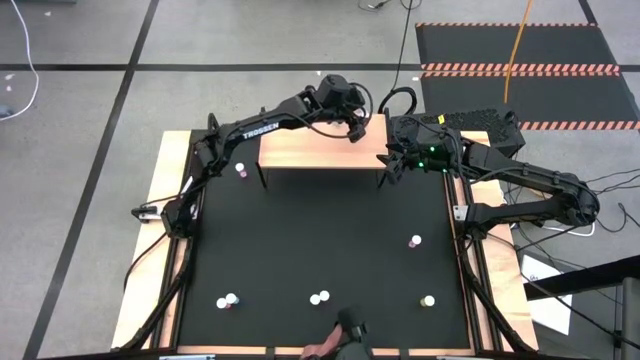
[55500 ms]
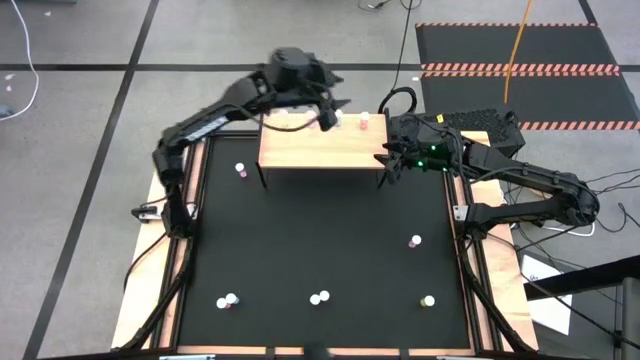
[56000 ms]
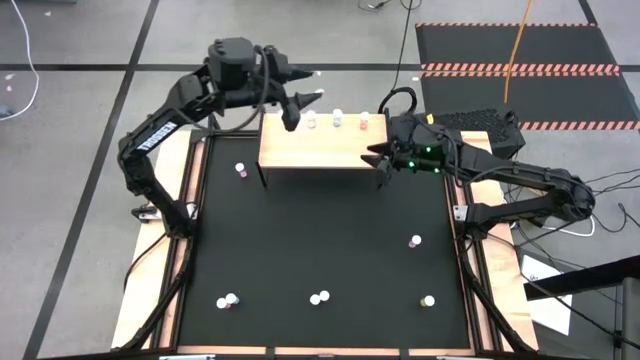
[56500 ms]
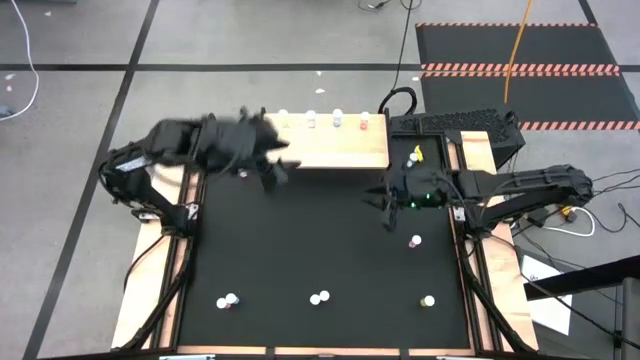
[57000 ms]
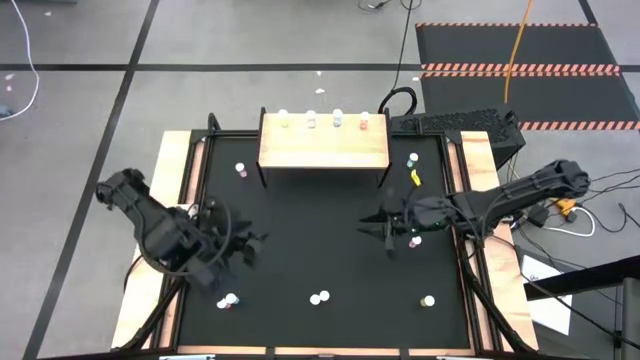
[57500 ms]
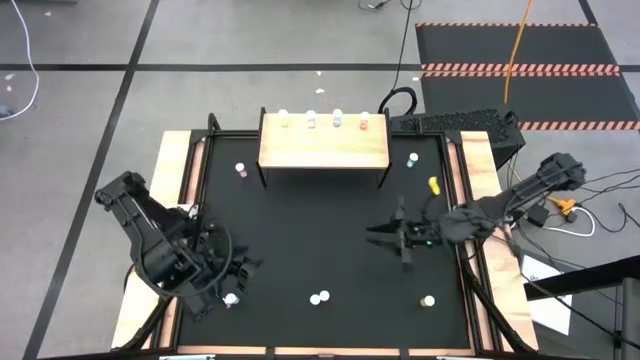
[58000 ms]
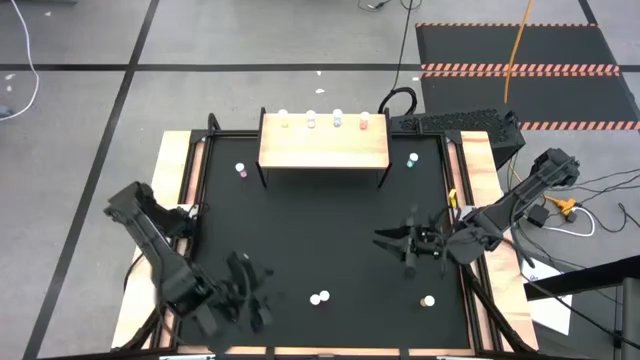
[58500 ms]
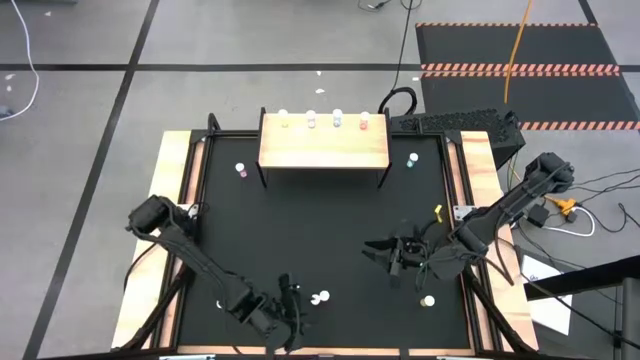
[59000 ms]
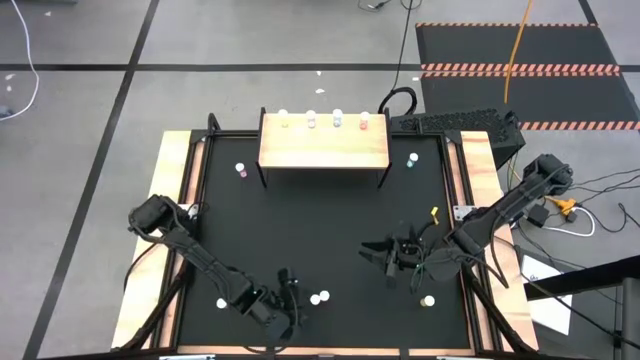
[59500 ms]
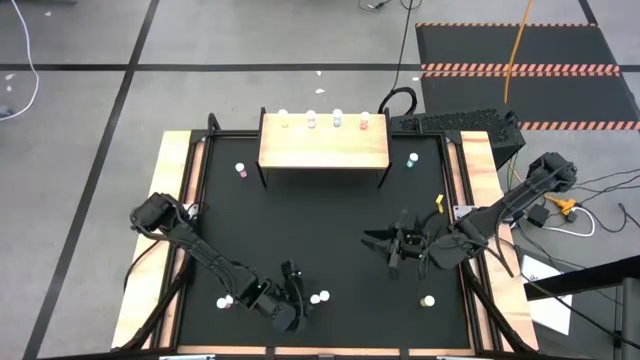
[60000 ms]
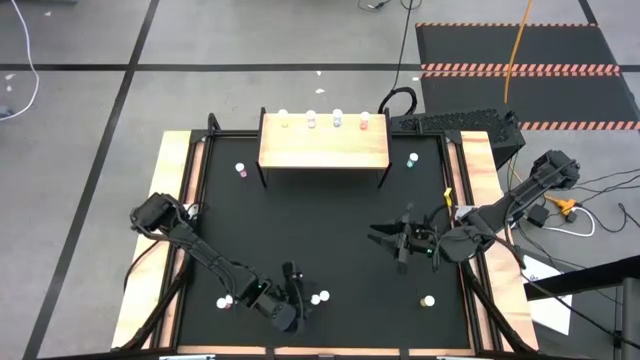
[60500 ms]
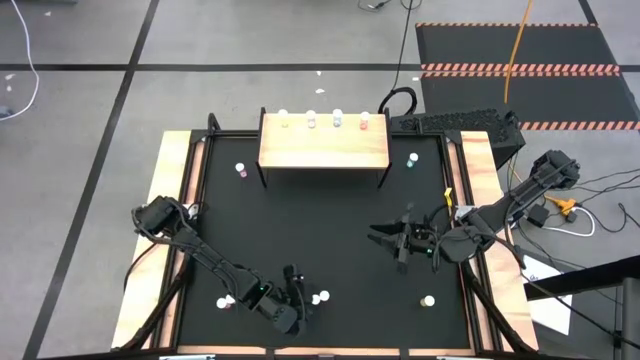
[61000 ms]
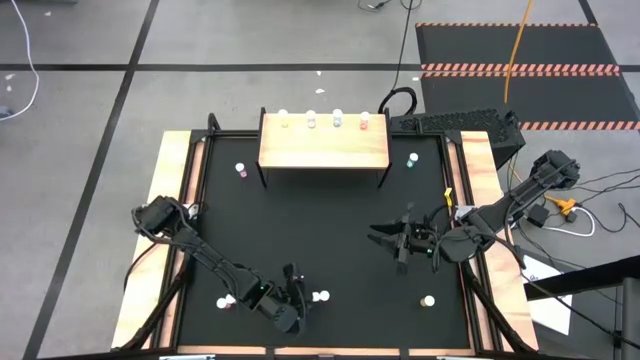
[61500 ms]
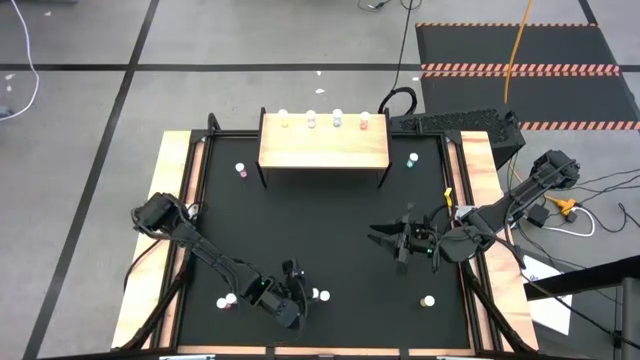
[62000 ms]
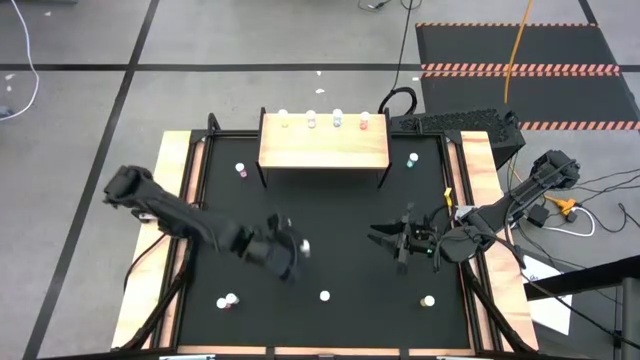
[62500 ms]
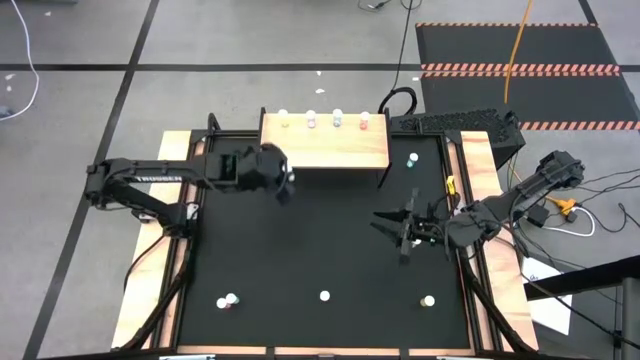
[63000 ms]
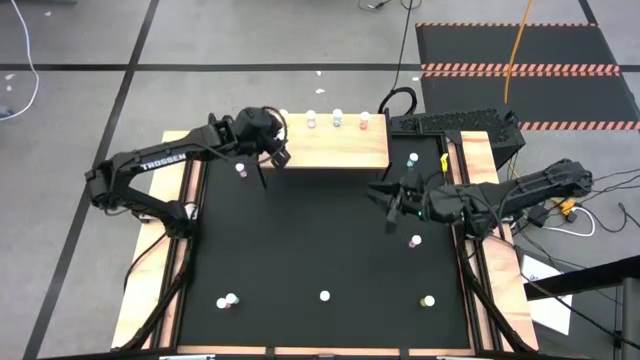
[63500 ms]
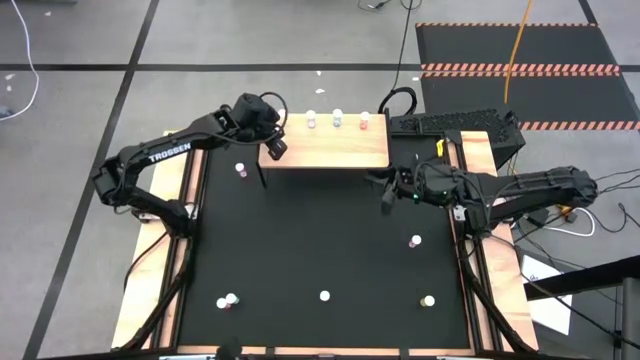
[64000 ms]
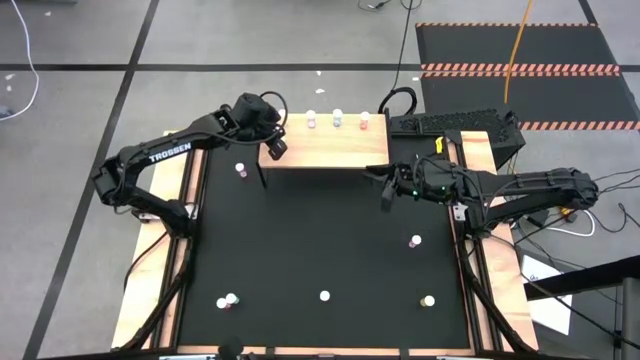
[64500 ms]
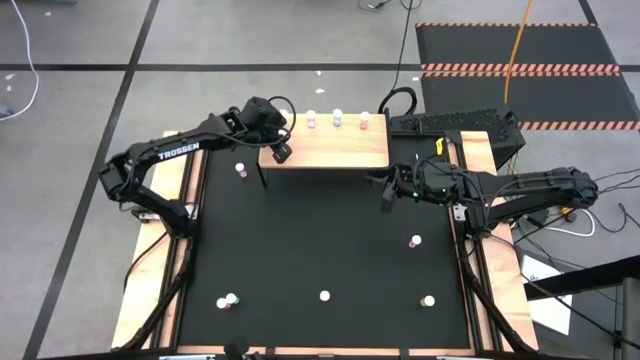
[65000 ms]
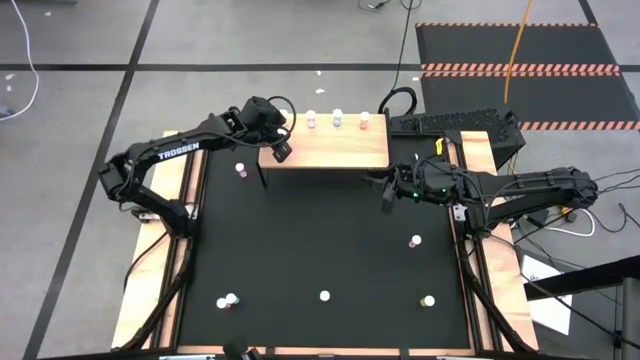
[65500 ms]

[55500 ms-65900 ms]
Task: Pick and place medicine bottles onto shelf by color
Put the left yellow pill bottle on the shelf aligned with the yellow pill bottle

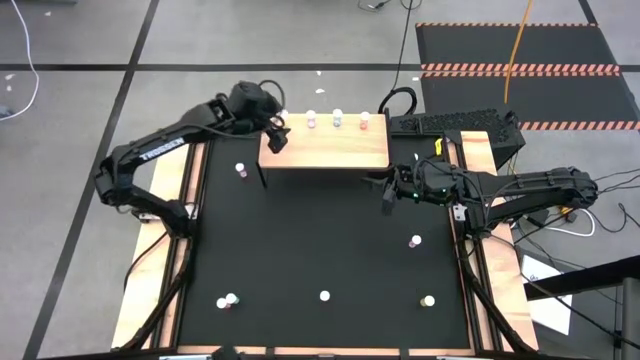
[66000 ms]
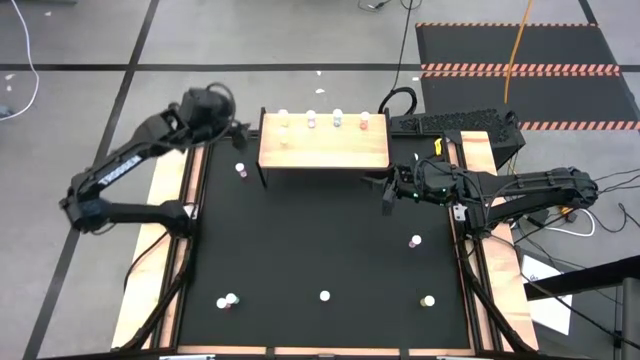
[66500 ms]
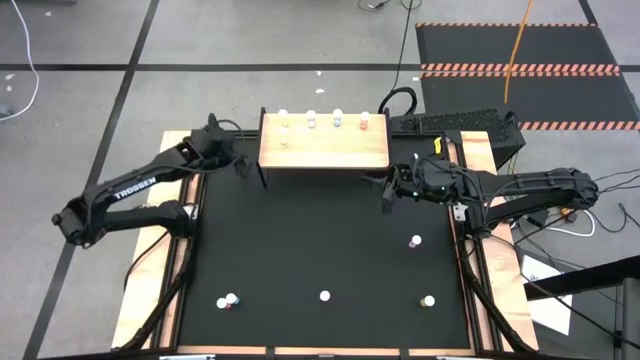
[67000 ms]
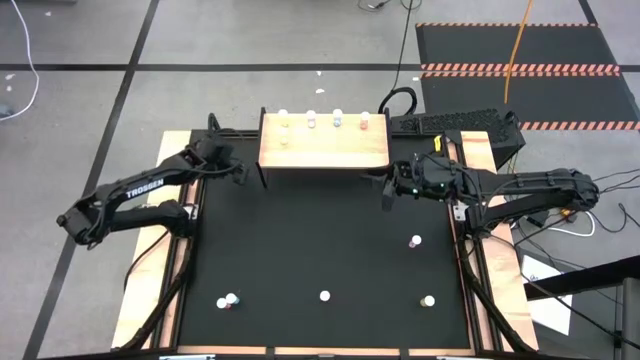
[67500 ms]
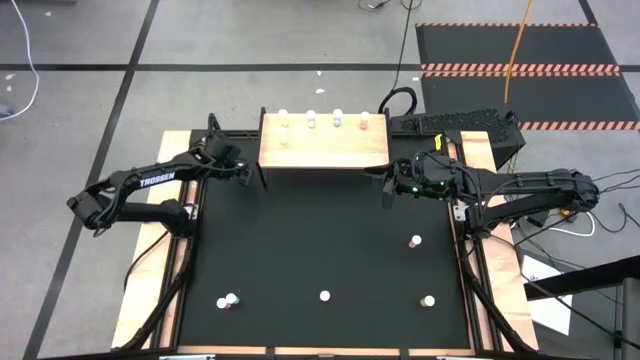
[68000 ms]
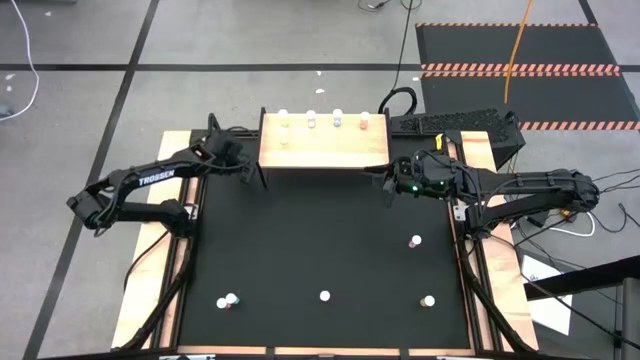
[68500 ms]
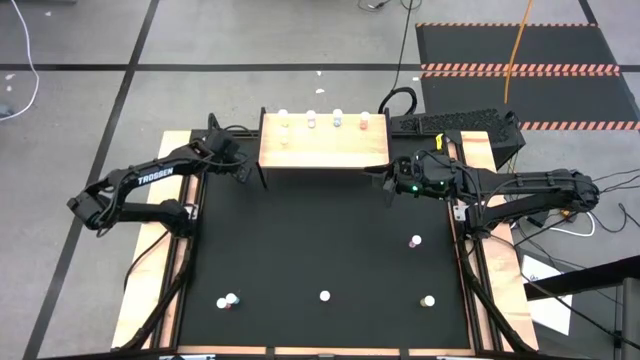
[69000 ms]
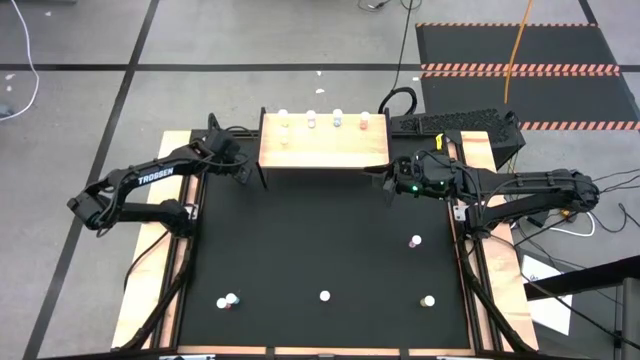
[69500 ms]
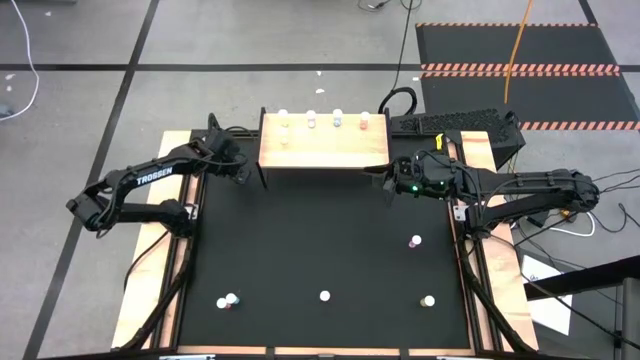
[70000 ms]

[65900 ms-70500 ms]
Put the top pink pill bottle on the shelf aligned with the other pink bottle

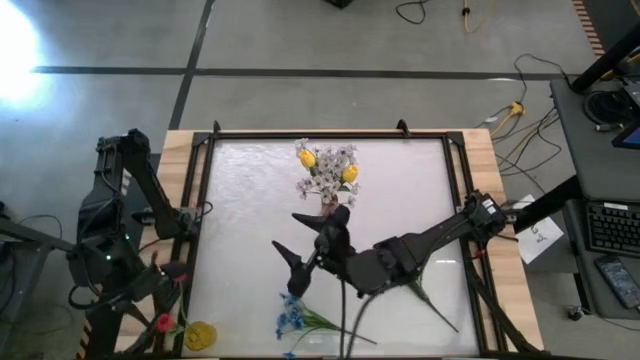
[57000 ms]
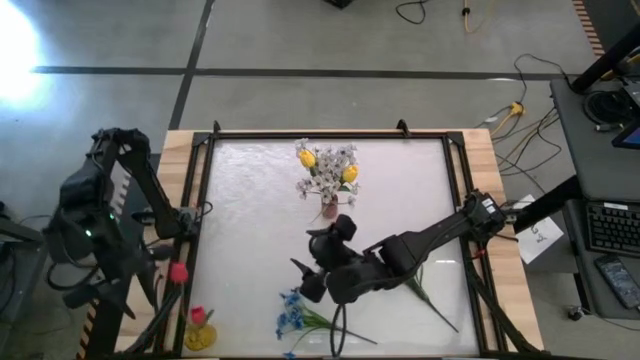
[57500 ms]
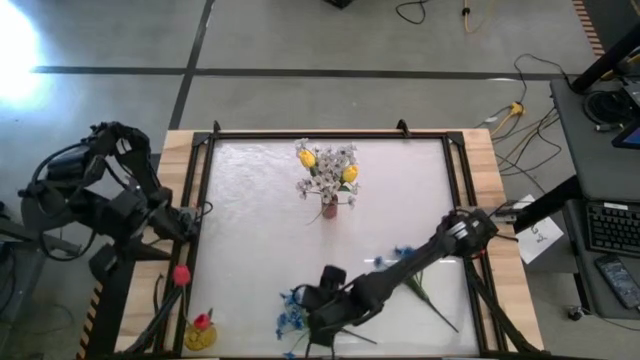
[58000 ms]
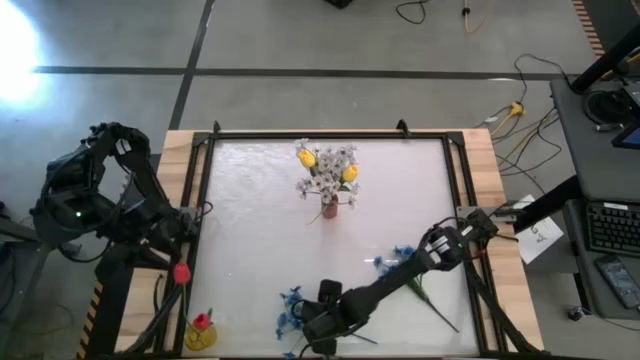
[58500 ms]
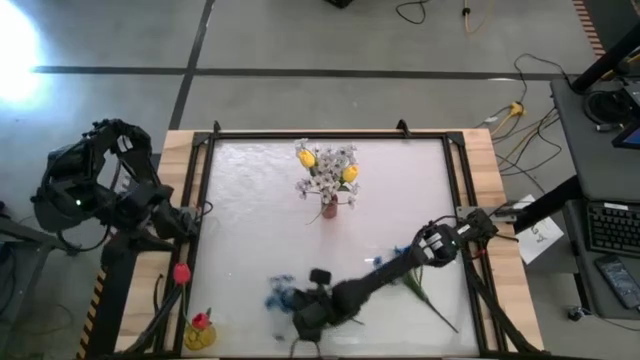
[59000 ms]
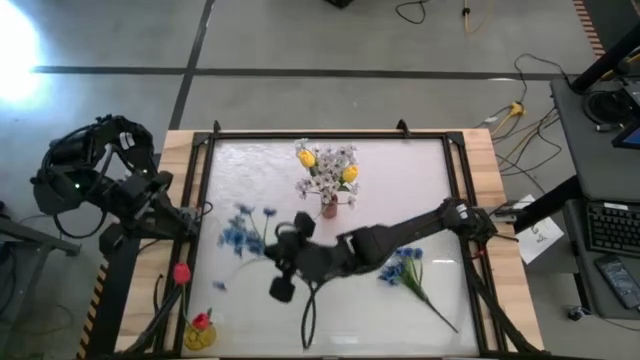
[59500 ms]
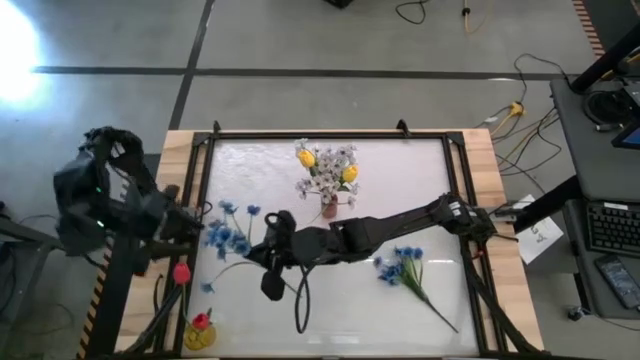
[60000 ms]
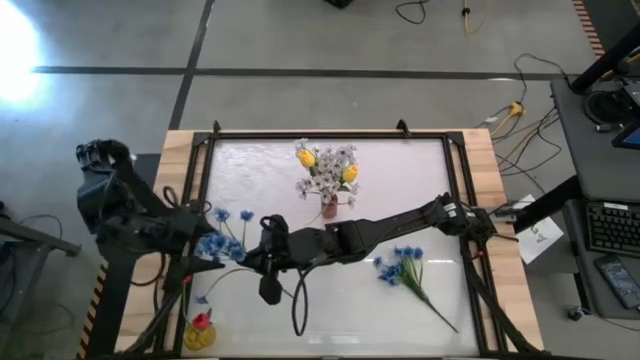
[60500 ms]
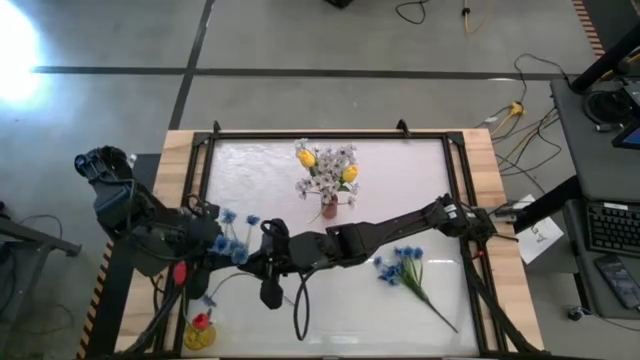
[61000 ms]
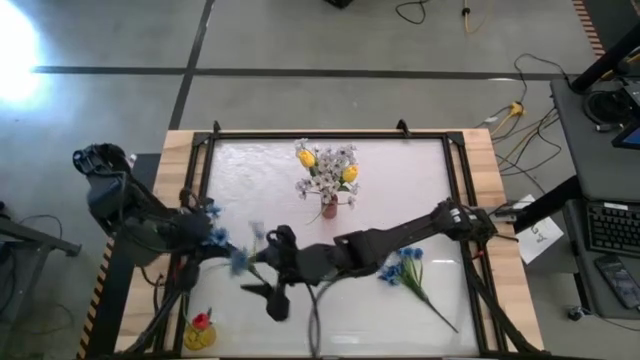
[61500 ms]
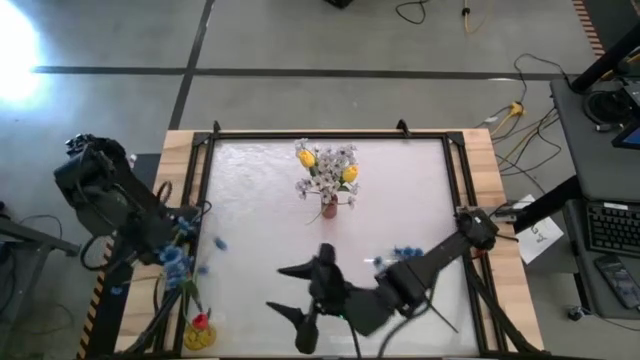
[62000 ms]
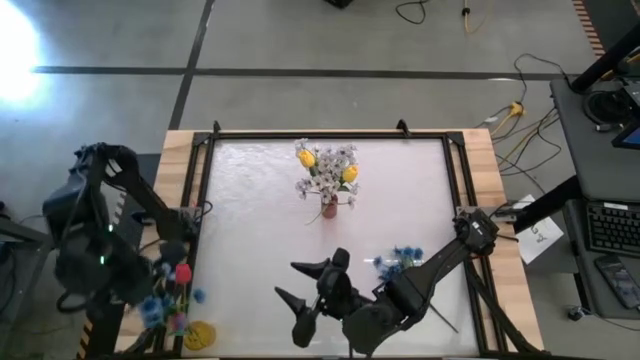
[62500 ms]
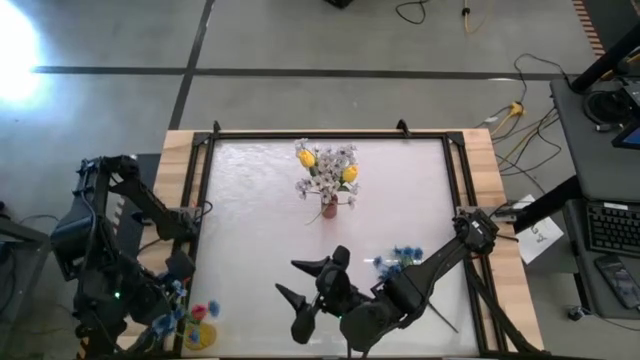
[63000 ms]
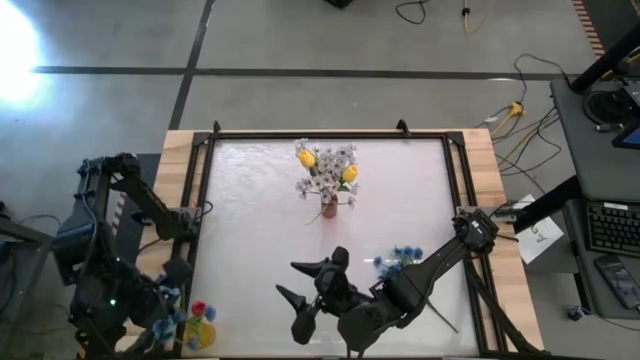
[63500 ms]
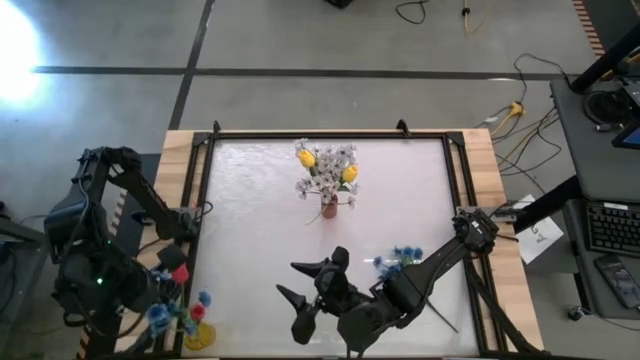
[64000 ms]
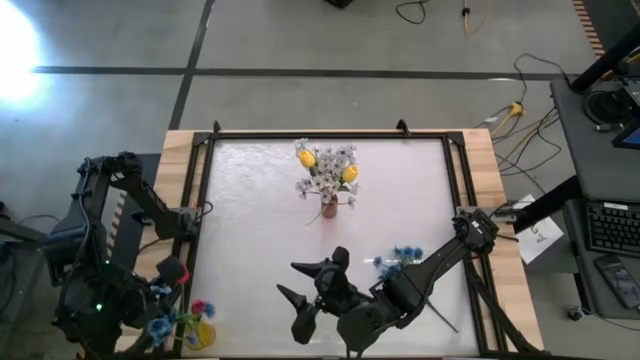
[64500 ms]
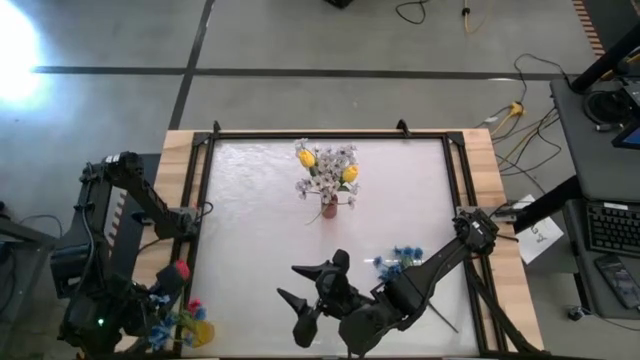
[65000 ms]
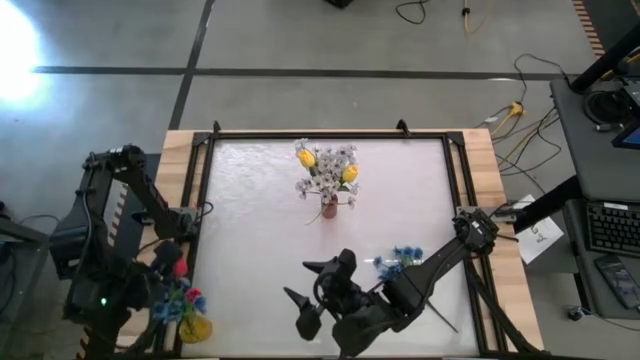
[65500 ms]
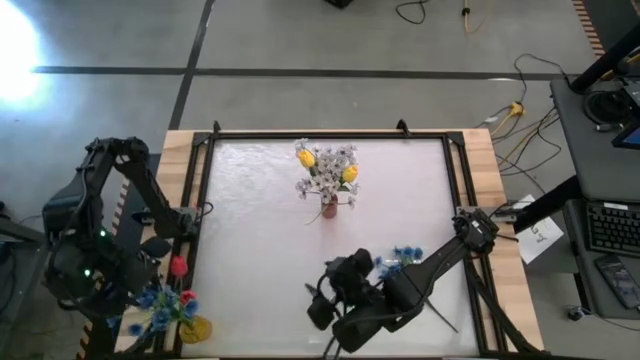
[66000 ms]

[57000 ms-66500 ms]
Task: Sort flowers into vase by color
Put the left blue flower into the yellow flower vase
